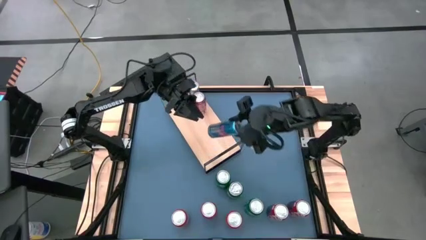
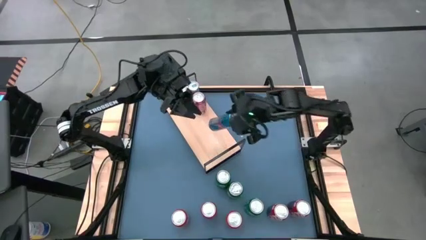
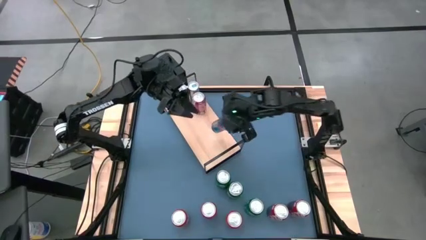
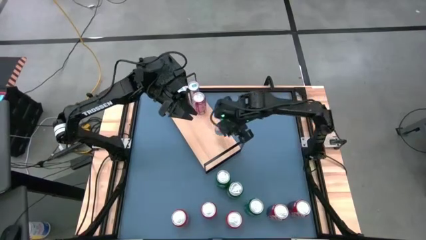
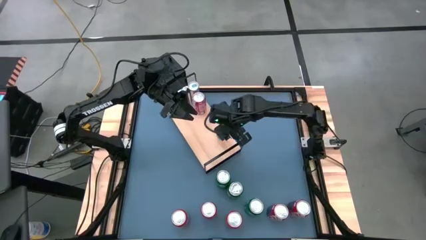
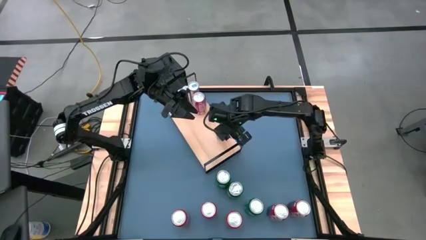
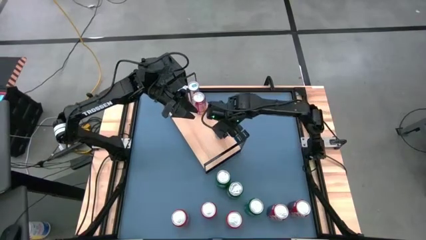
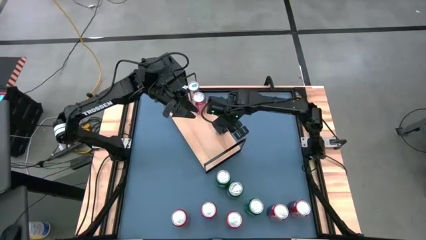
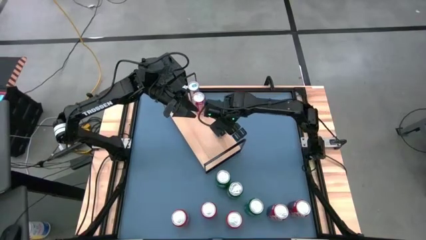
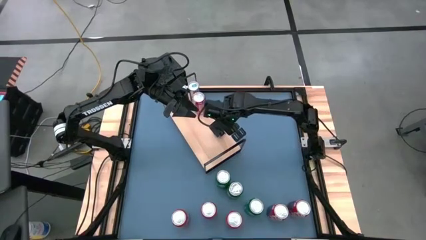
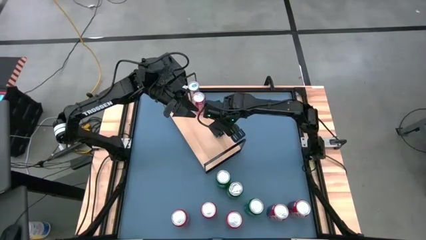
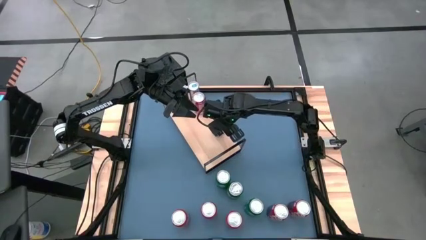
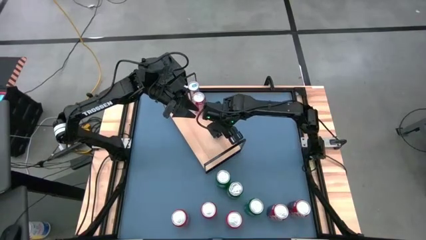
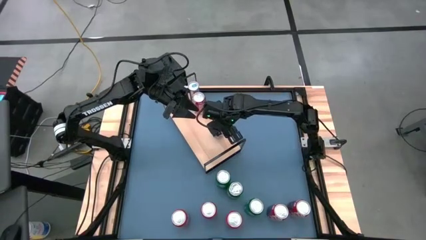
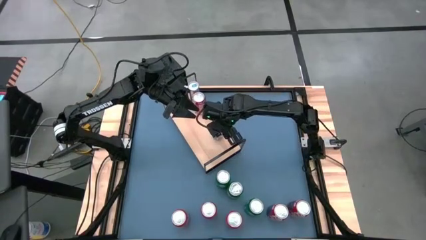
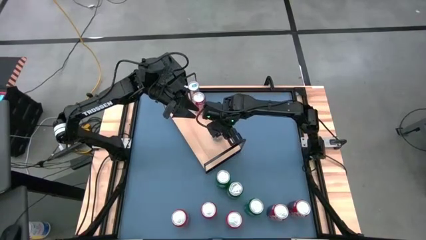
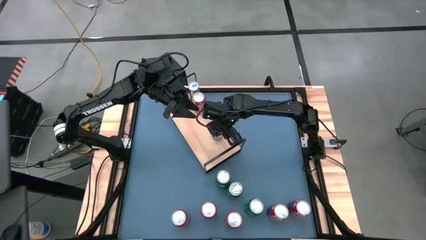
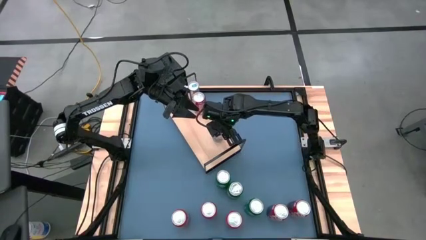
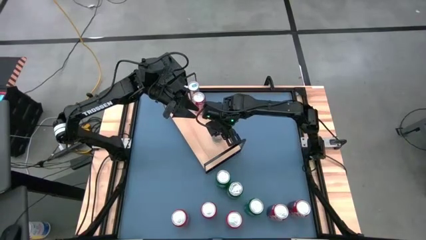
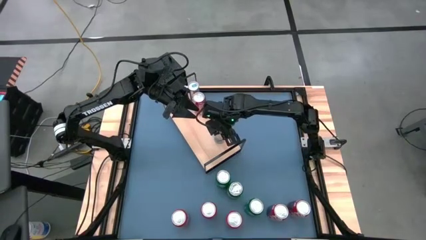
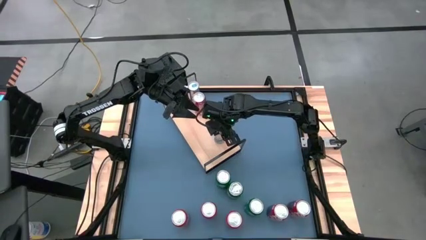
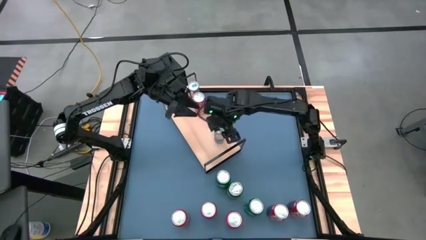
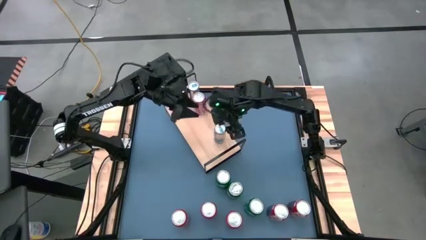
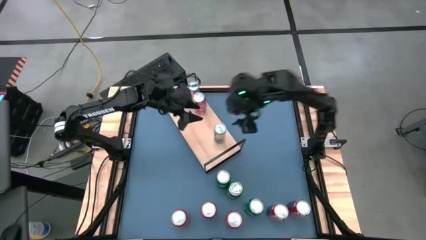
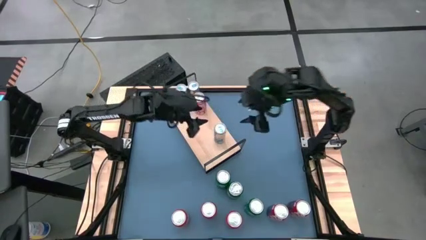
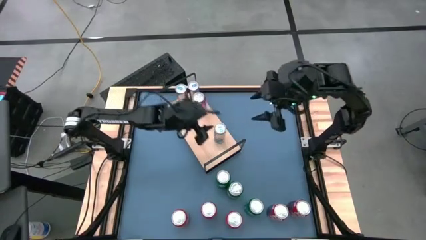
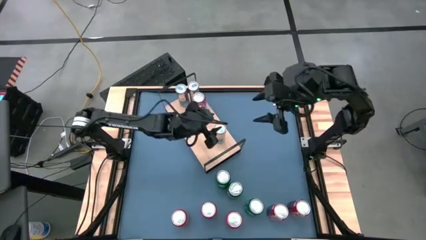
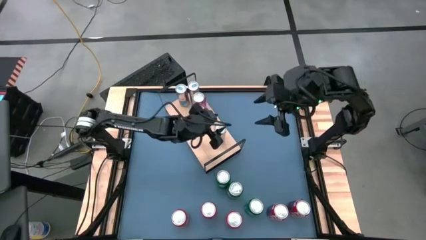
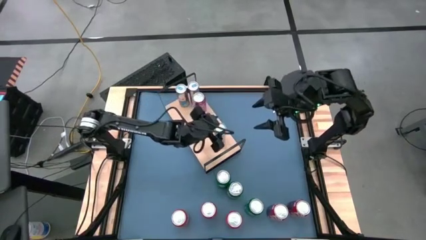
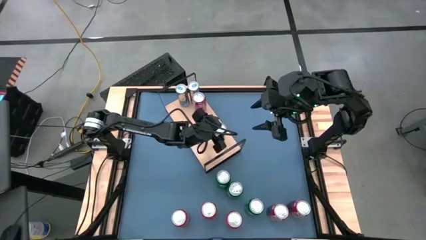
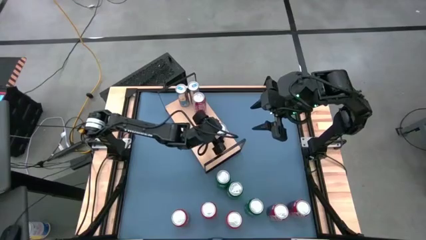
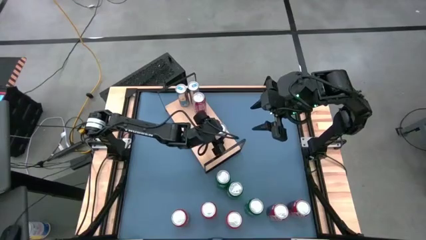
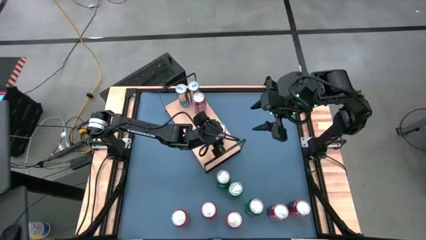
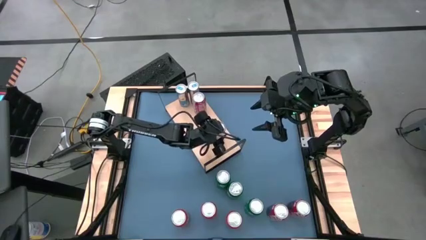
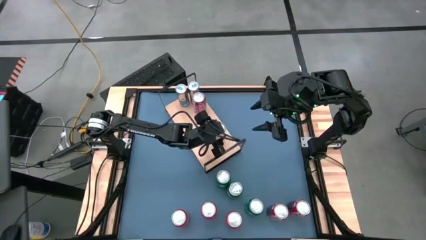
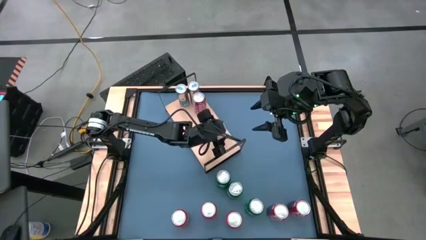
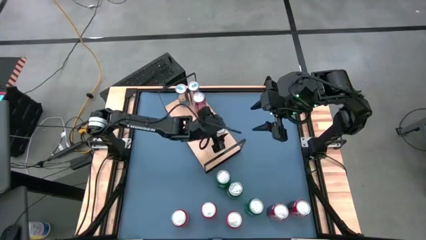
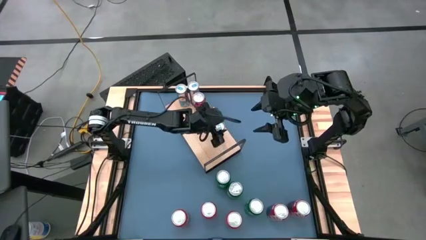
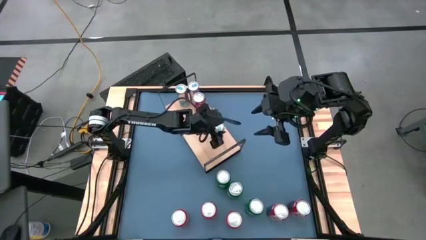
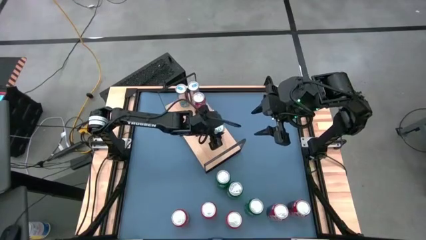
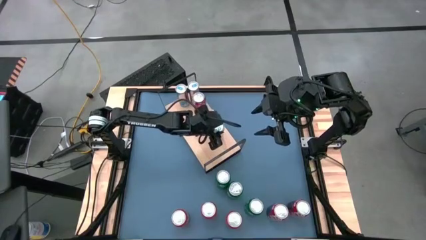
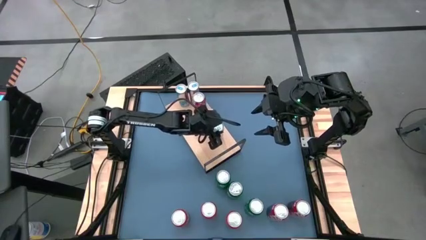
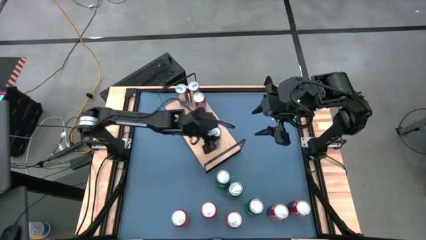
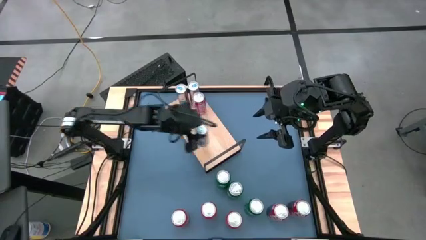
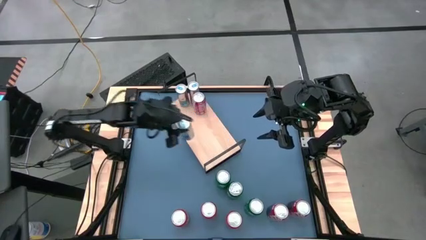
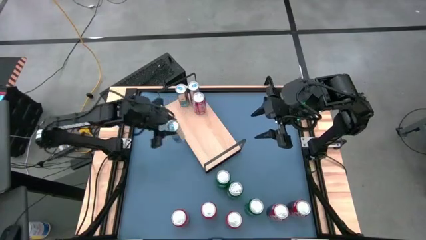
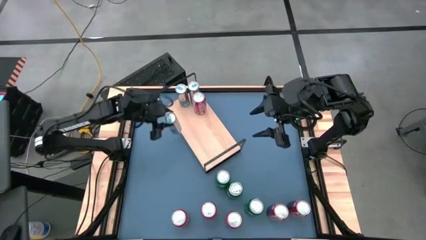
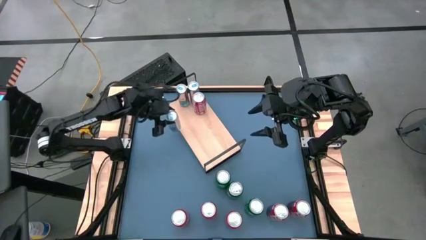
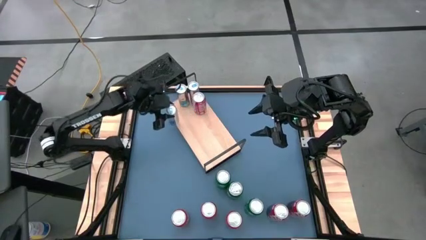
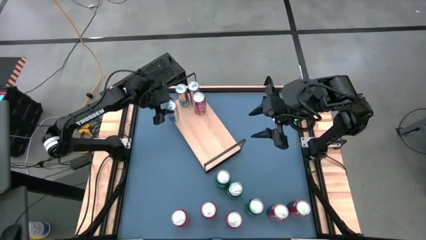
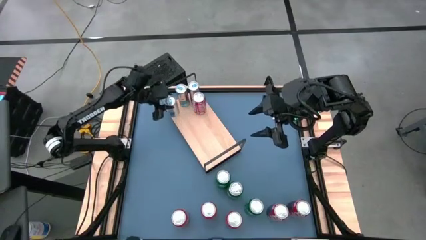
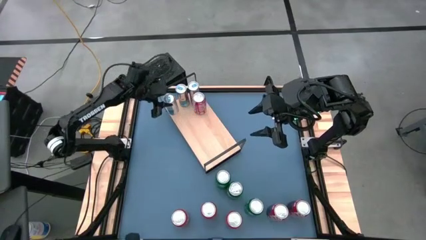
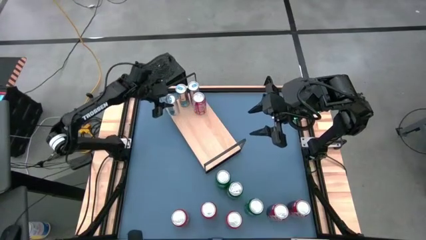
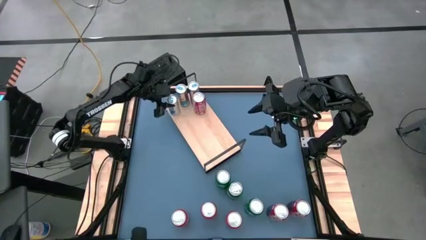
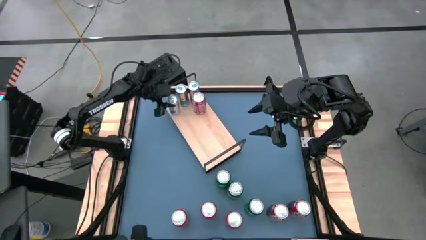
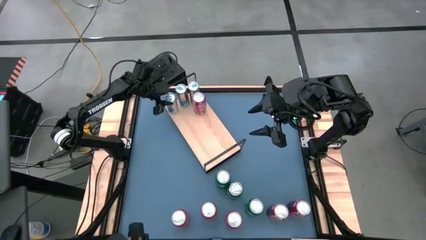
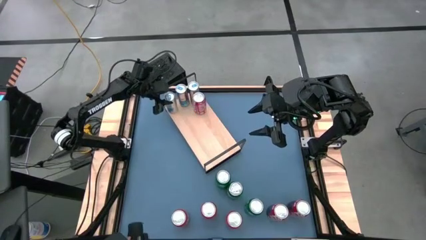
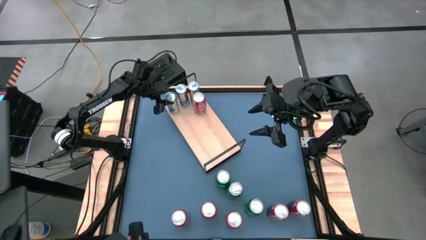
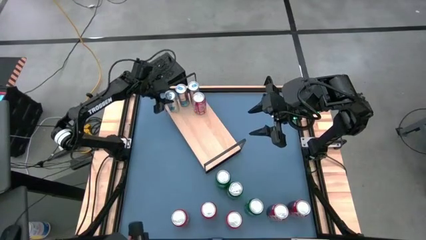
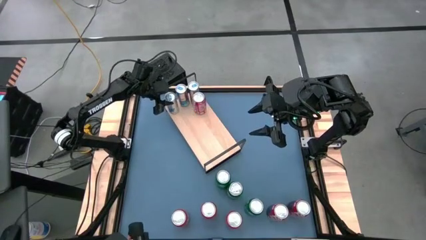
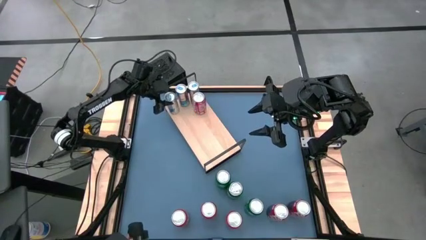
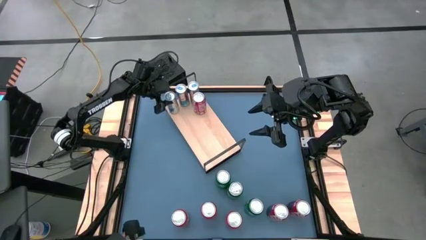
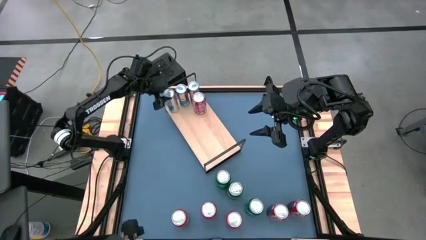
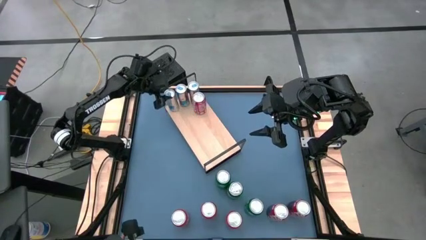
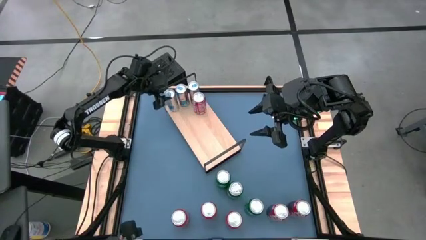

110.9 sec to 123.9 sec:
Task: Place canned beverage on shelf
Put the blue soda can on the shelf aligned with the other blue soda cans
